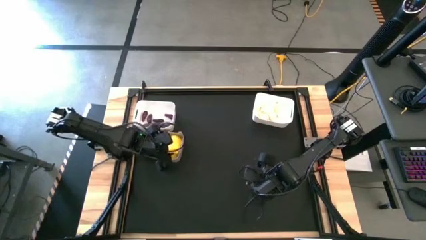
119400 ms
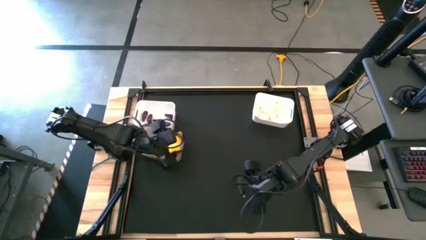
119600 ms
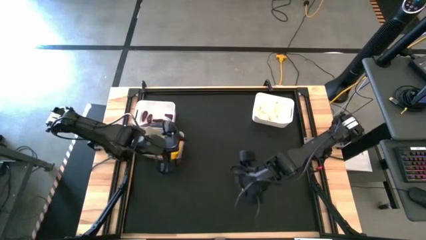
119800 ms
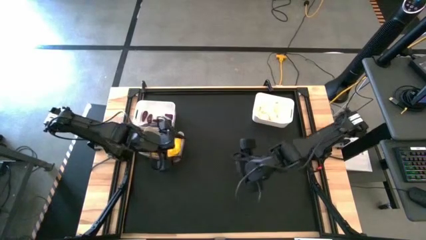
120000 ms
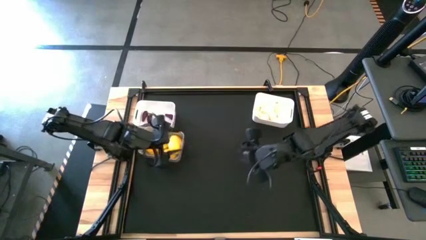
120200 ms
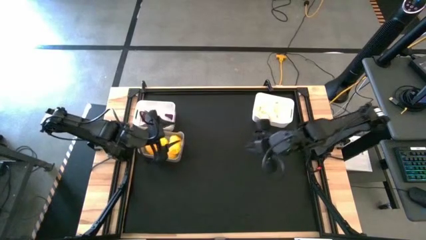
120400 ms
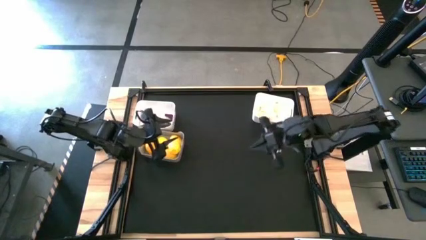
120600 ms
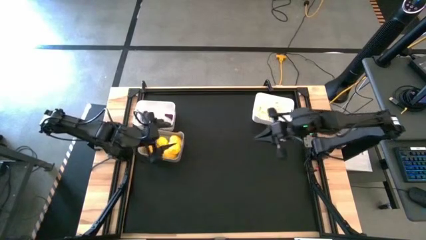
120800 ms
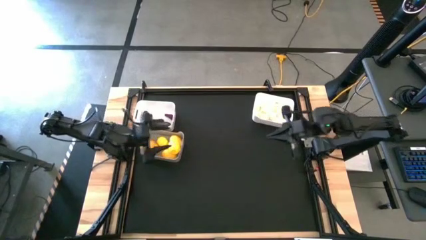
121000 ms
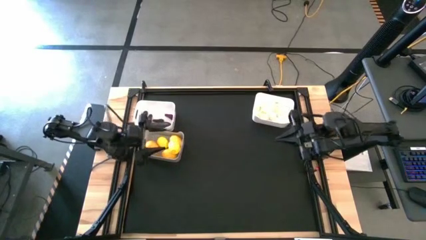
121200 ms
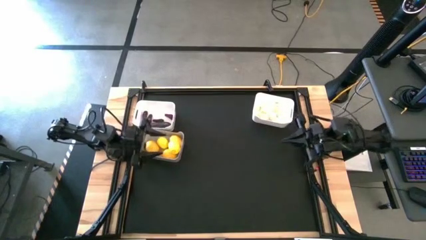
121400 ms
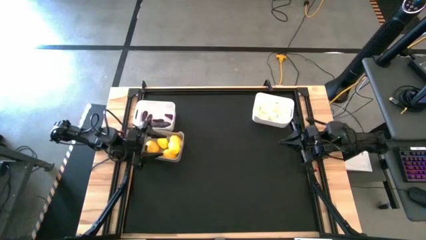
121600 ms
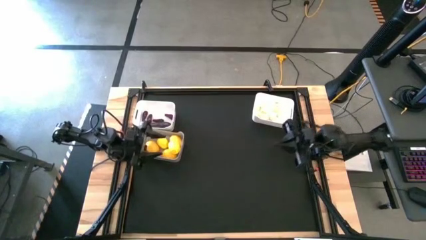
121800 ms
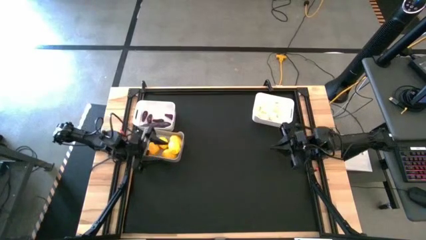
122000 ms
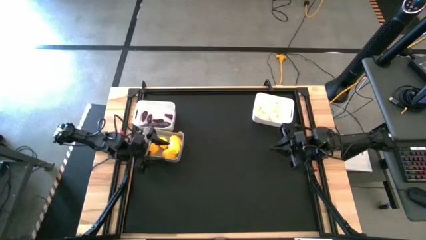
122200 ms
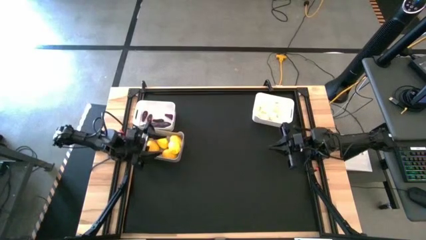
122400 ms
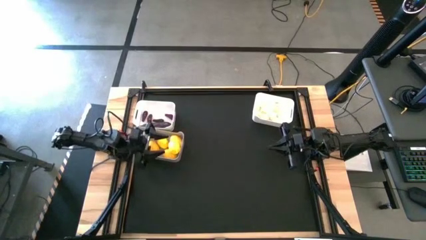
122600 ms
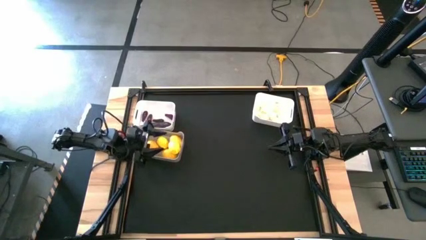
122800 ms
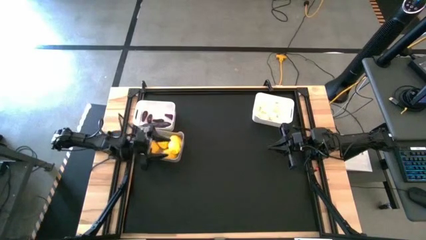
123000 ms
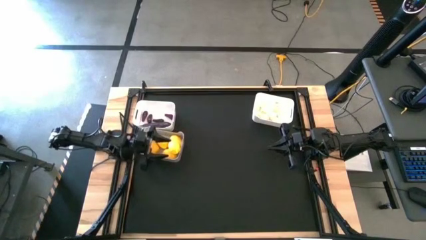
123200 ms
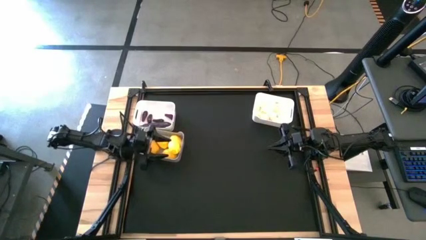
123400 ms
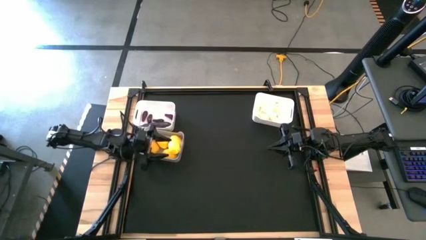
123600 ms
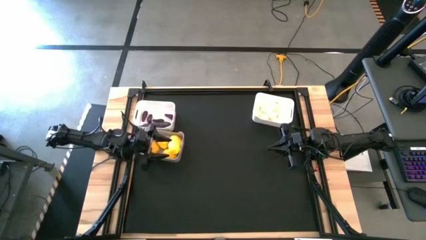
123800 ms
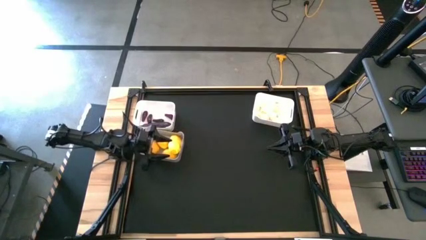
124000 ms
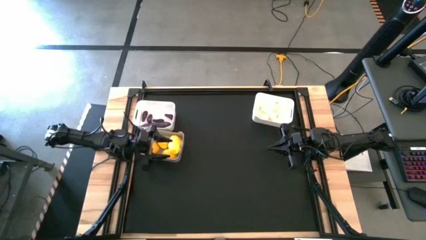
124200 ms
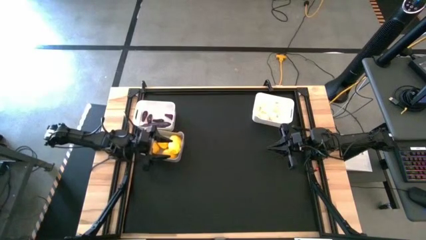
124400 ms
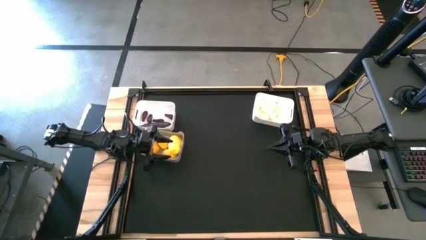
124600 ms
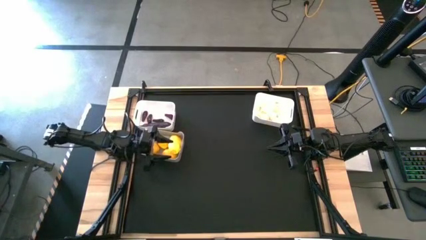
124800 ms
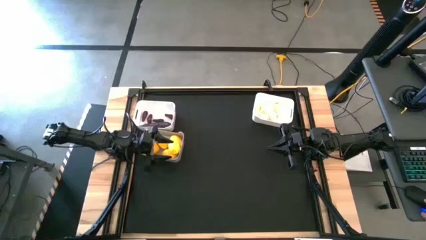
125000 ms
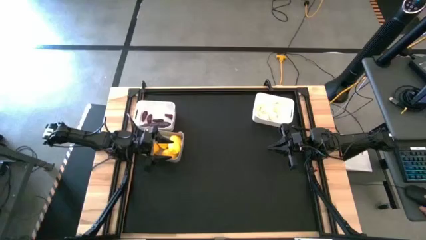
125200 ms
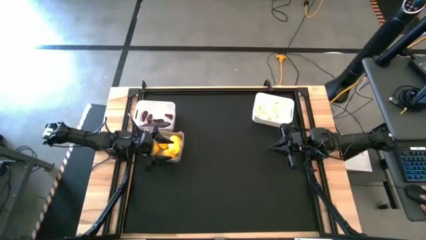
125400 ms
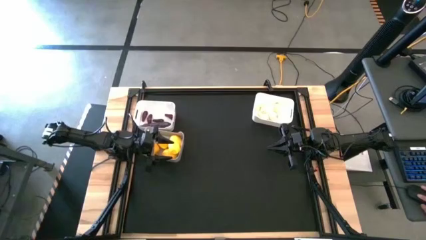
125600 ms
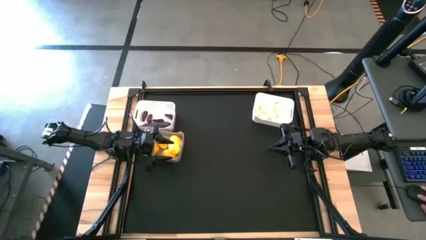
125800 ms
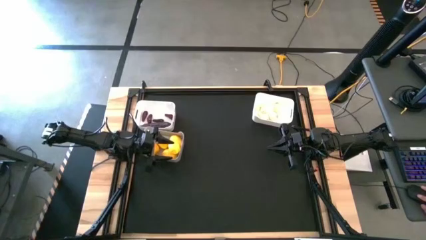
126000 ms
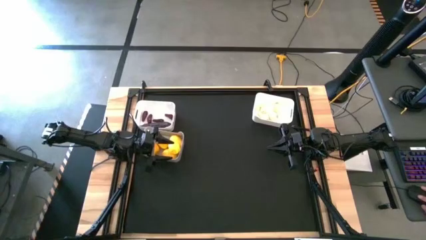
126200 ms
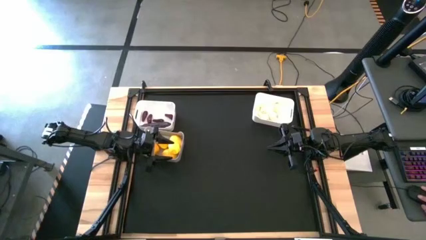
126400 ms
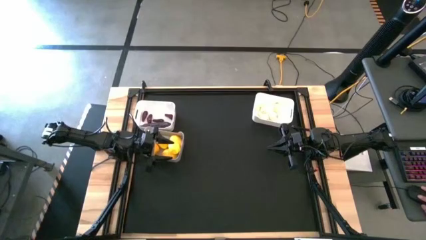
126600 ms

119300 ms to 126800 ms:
Task: Sort produce into baskets
Return to Home Position

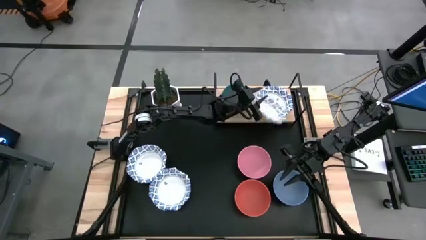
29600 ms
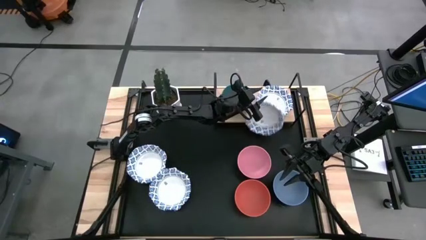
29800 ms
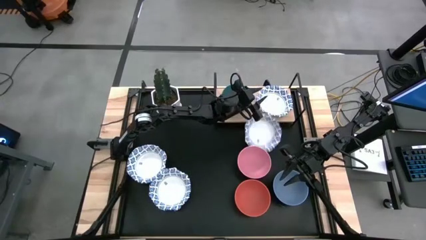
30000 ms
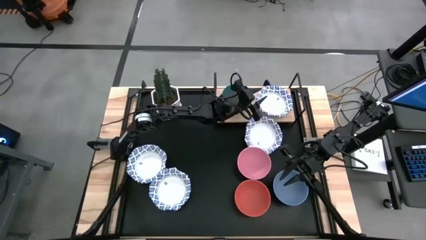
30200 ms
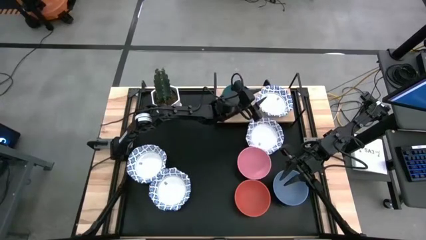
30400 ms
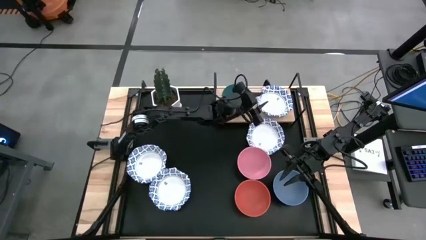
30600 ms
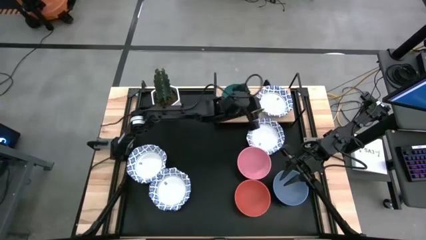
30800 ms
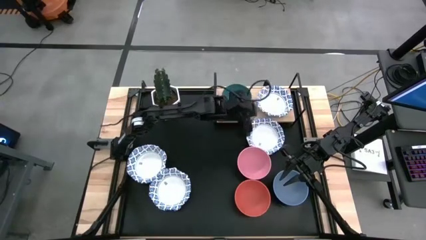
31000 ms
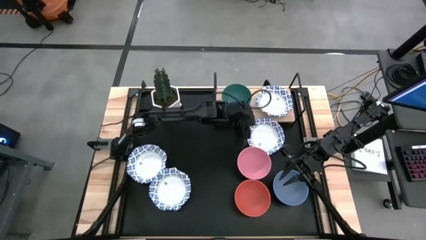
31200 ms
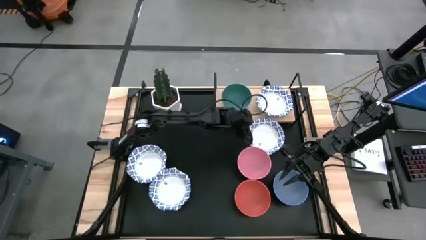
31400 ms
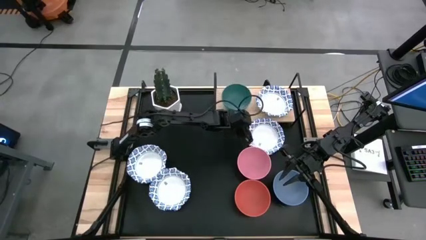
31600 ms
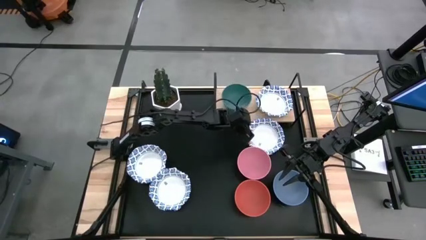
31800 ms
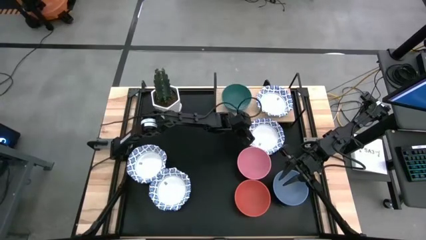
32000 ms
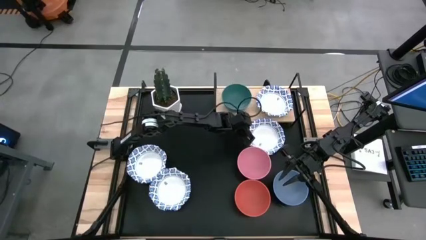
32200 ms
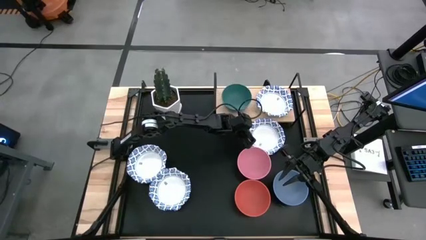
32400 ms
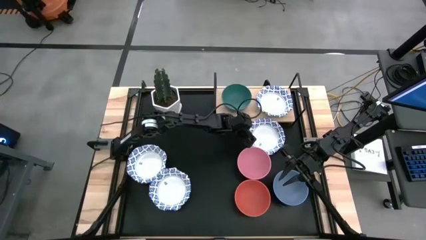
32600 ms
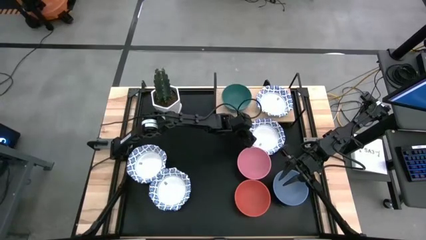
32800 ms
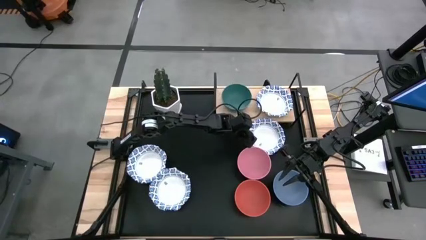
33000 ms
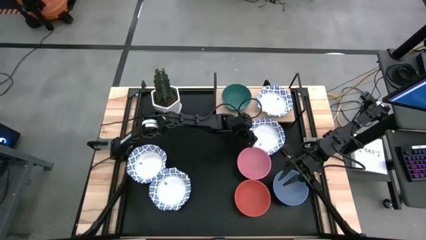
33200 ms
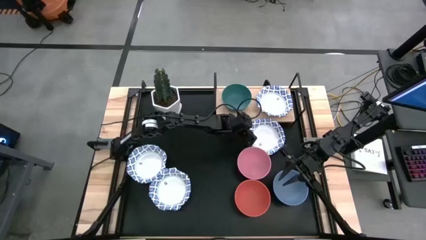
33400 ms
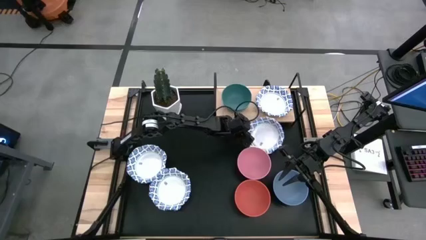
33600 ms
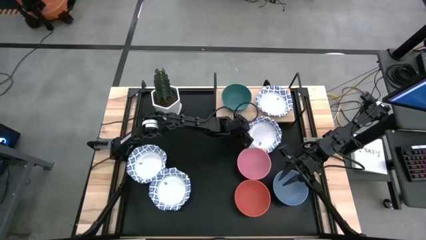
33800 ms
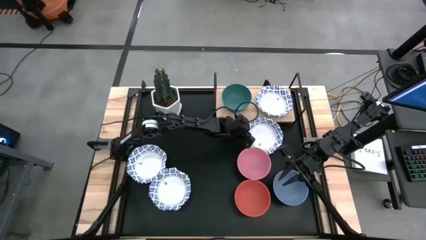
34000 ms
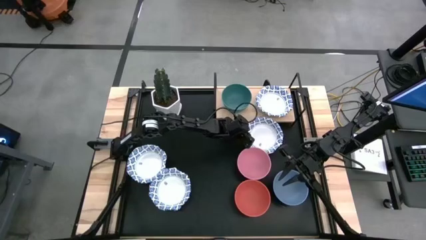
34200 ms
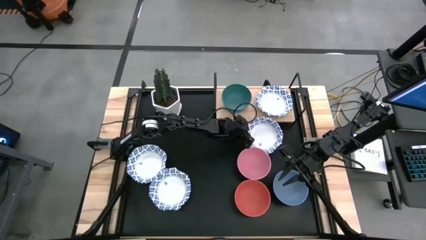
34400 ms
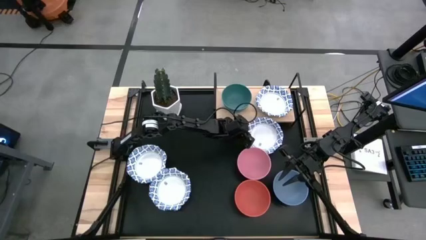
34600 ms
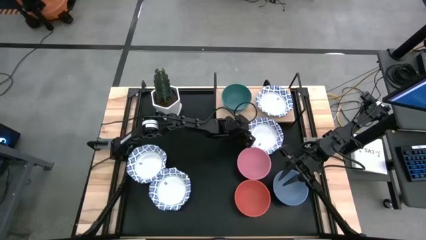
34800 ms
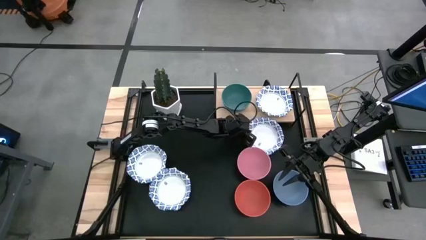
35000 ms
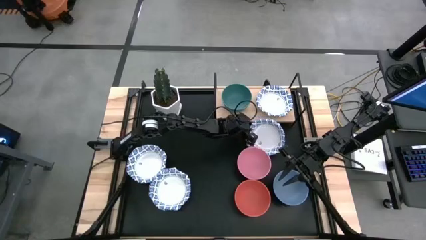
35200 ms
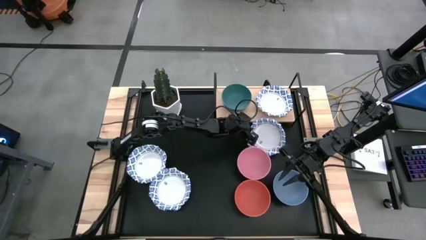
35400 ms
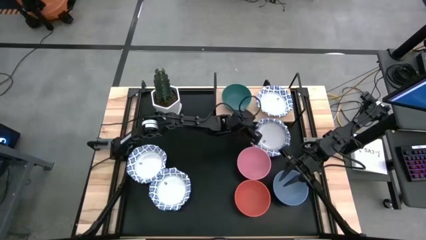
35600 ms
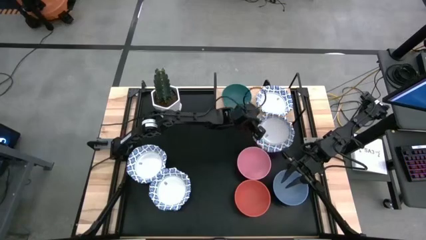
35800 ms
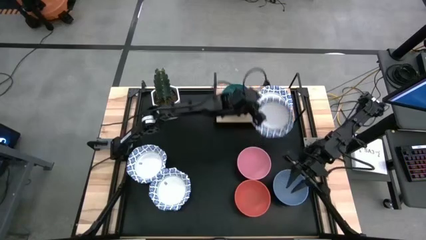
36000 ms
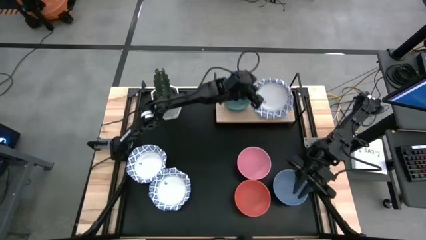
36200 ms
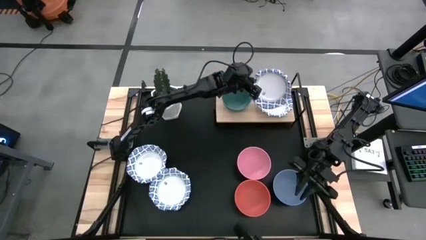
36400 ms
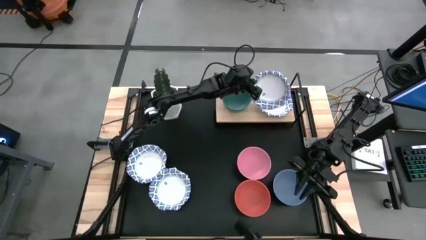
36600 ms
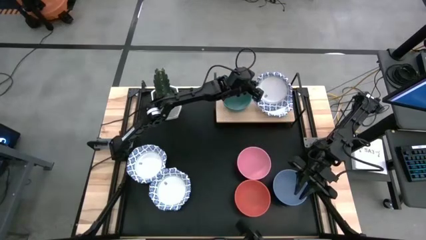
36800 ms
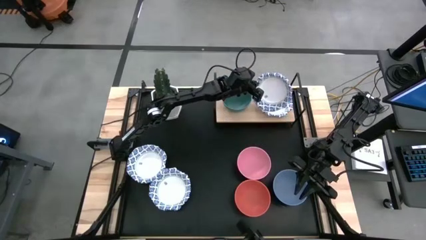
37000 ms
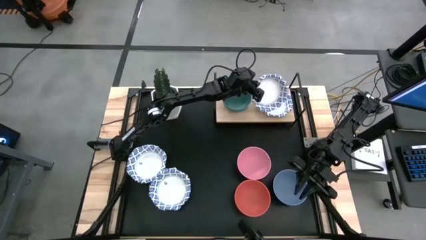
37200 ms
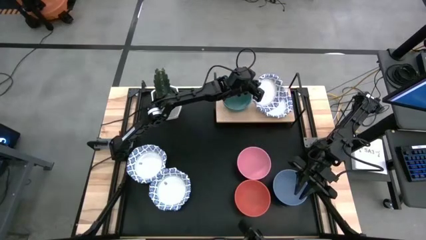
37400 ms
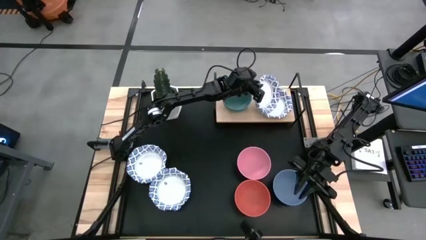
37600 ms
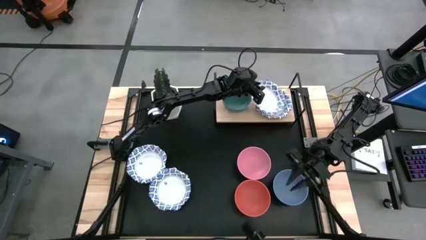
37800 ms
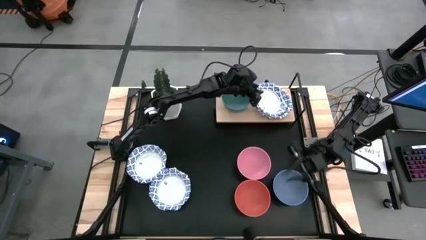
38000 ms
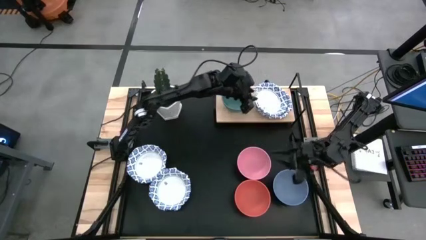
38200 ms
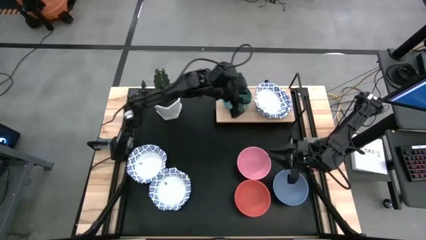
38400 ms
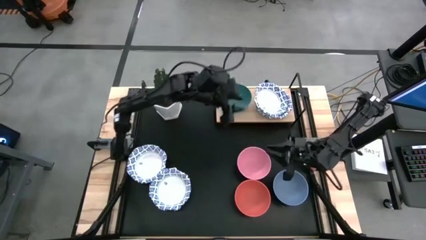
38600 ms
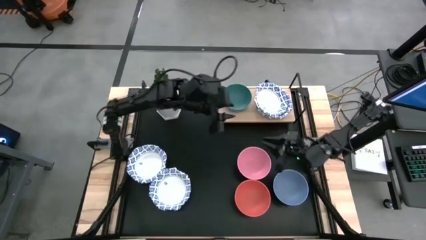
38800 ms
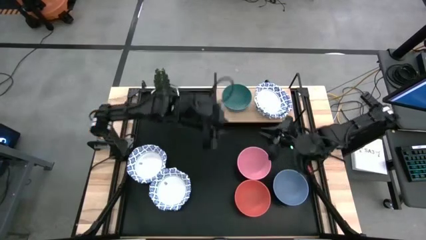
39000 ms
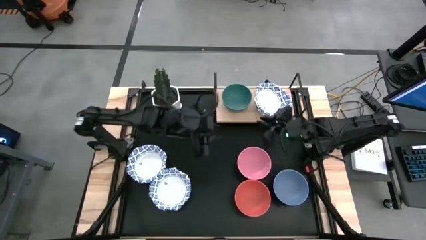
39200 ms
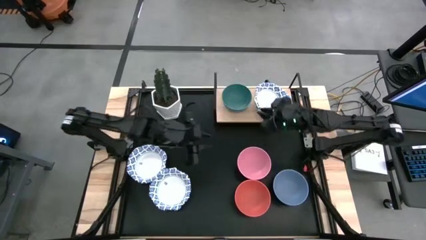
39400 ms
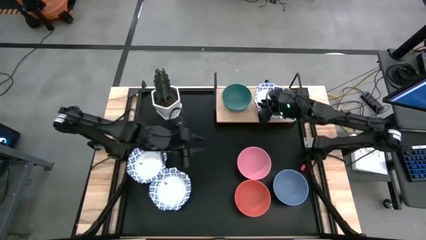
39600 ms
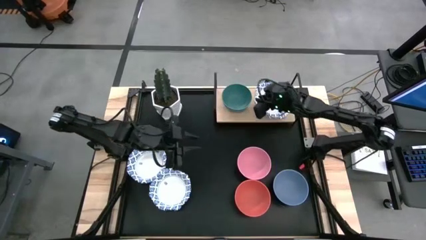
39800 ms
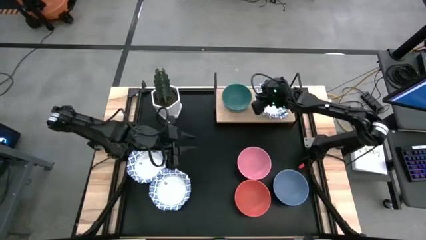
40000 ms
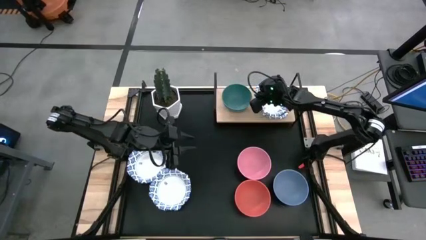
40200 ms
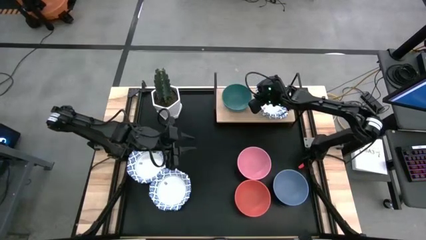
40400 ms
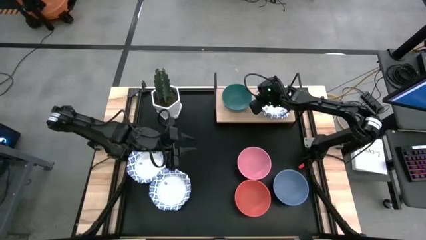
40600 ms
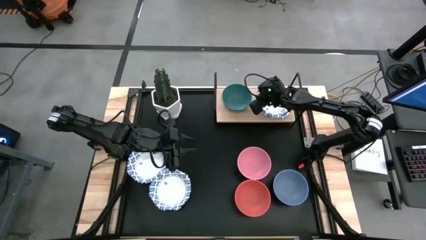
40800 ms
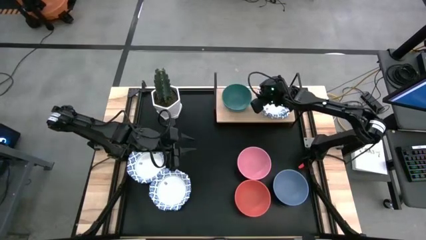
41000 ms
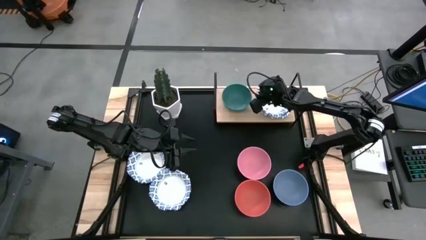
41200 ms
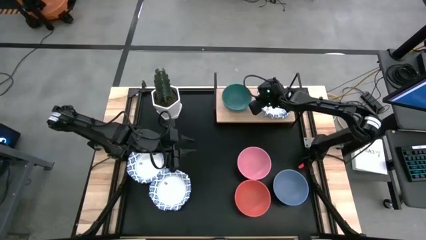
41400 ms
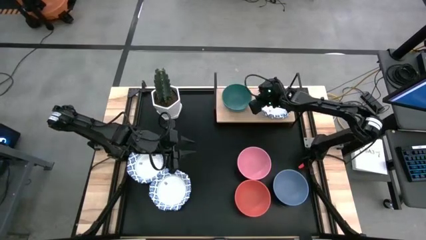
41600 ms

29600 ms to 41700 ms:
Task: Place and stack bowls onto a shelf
Stack the blue patterned bowl on top of the blue patterned bowl on the shelf
